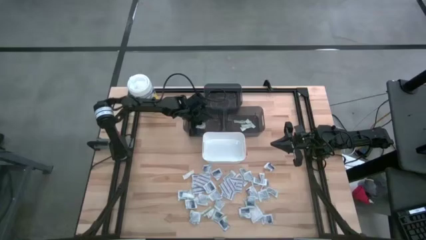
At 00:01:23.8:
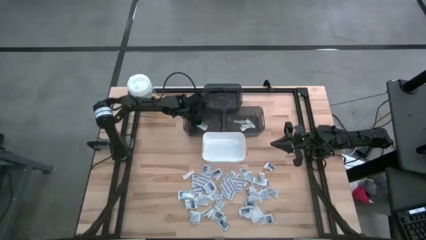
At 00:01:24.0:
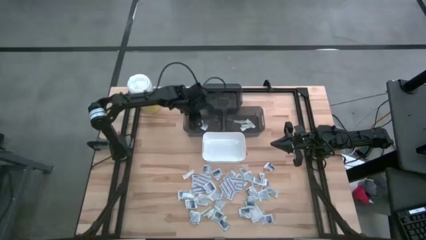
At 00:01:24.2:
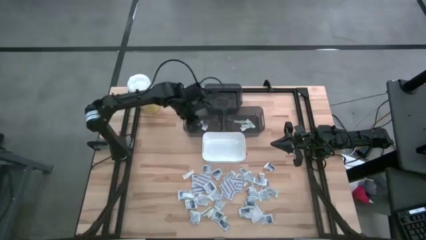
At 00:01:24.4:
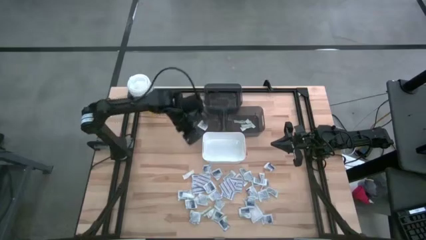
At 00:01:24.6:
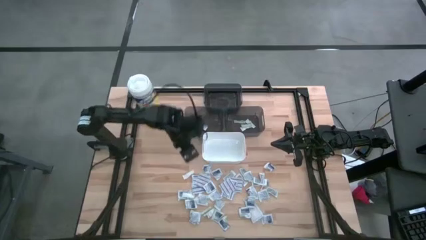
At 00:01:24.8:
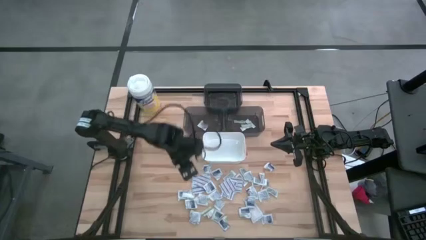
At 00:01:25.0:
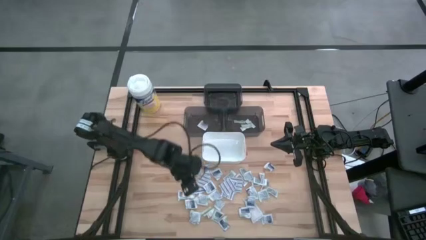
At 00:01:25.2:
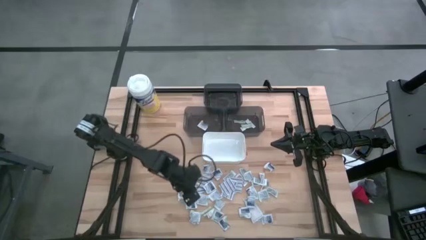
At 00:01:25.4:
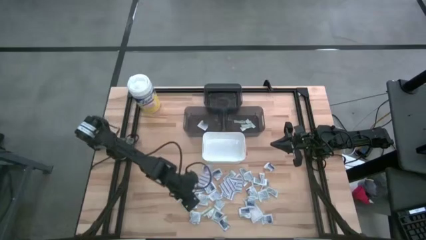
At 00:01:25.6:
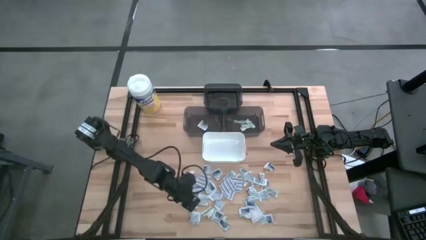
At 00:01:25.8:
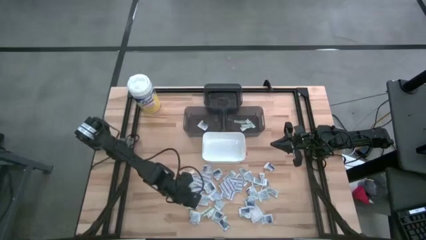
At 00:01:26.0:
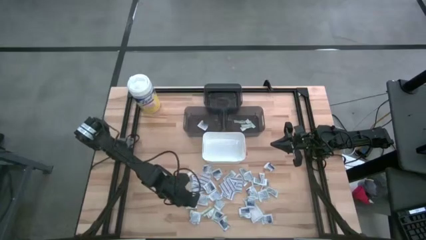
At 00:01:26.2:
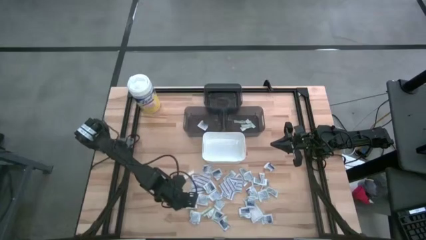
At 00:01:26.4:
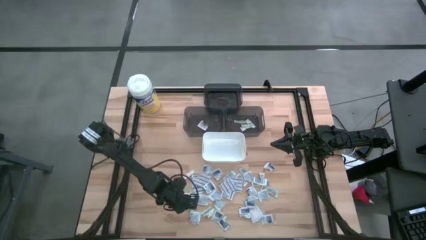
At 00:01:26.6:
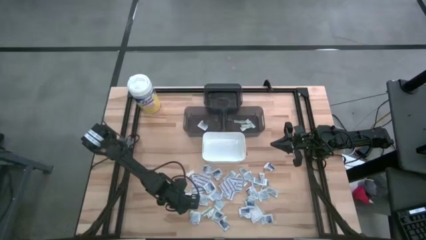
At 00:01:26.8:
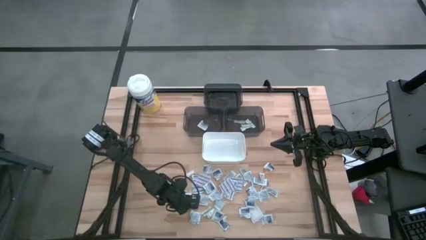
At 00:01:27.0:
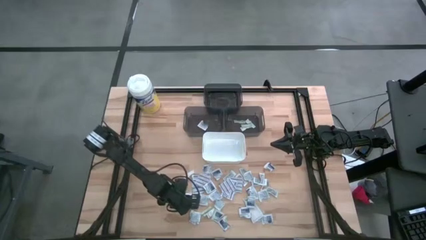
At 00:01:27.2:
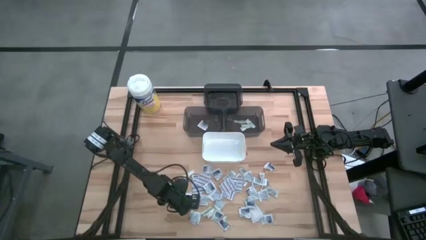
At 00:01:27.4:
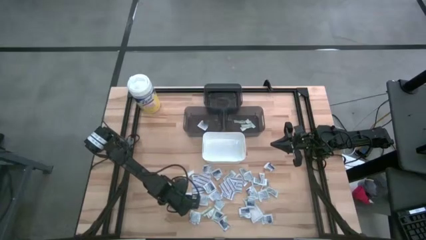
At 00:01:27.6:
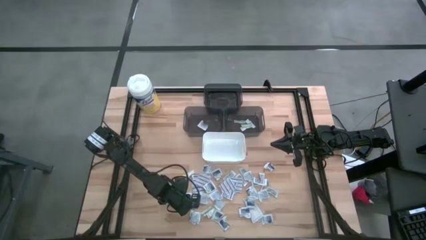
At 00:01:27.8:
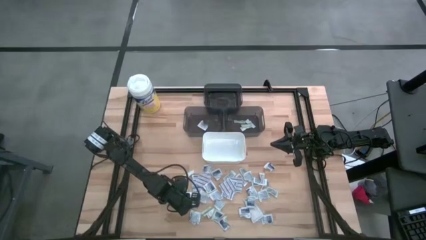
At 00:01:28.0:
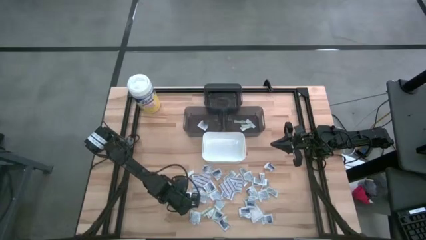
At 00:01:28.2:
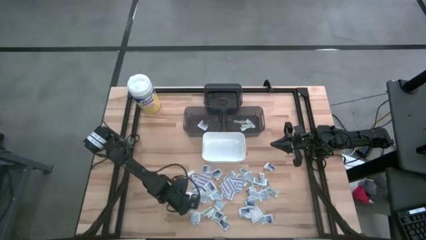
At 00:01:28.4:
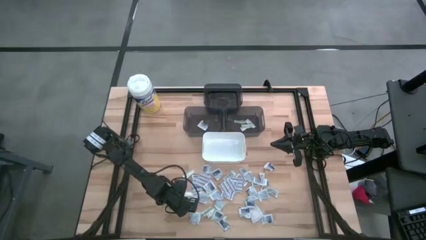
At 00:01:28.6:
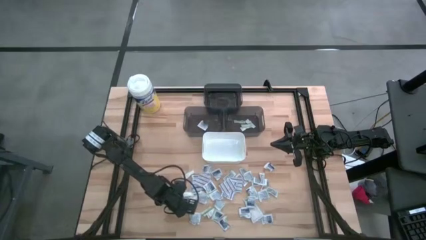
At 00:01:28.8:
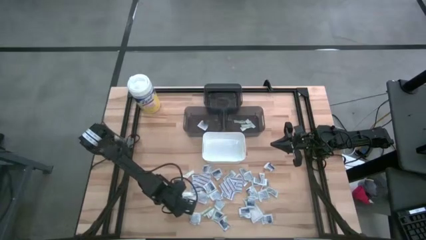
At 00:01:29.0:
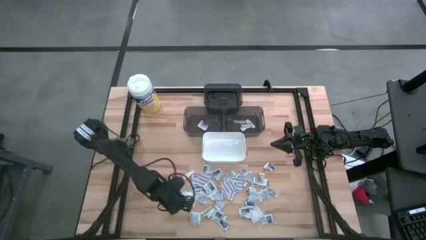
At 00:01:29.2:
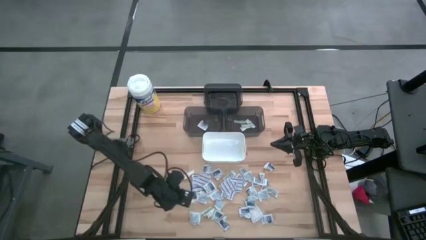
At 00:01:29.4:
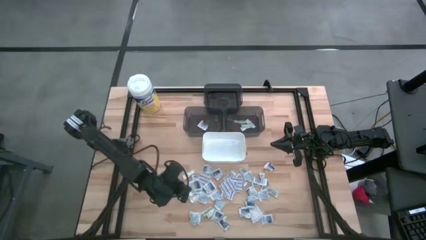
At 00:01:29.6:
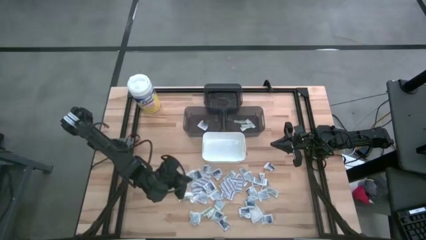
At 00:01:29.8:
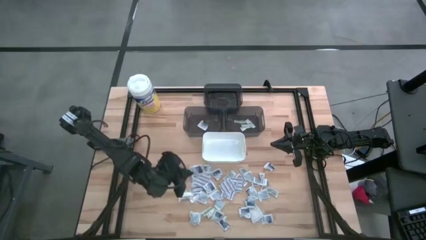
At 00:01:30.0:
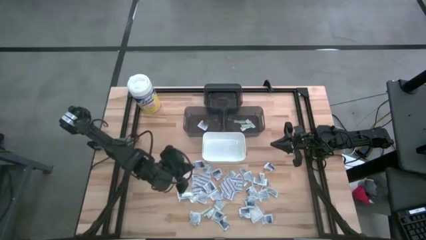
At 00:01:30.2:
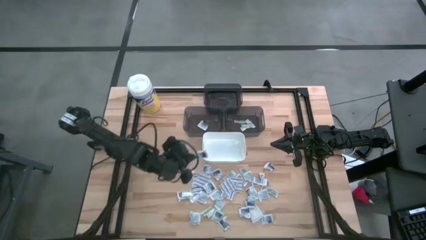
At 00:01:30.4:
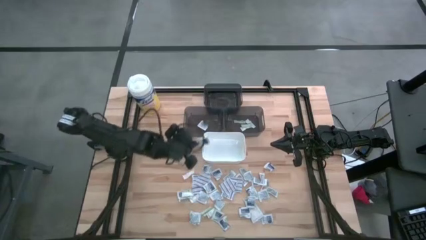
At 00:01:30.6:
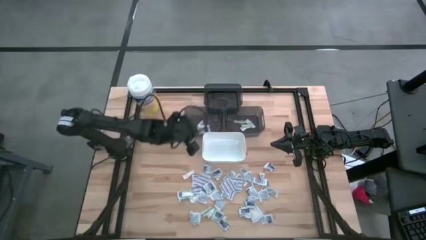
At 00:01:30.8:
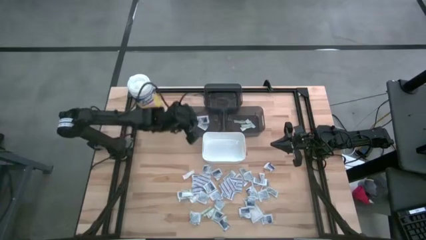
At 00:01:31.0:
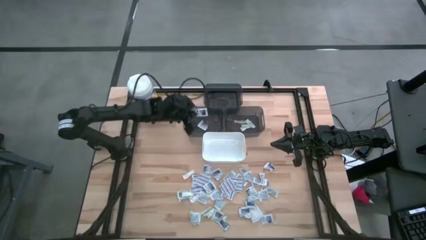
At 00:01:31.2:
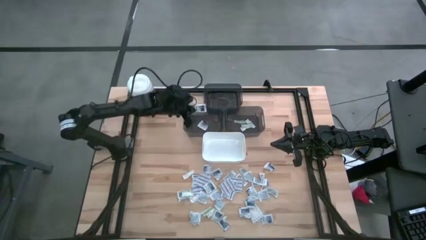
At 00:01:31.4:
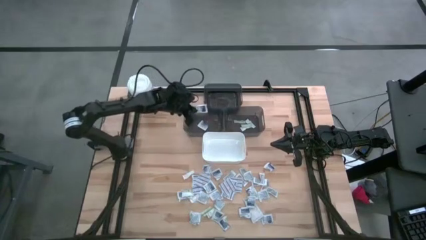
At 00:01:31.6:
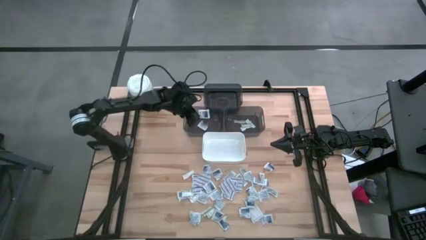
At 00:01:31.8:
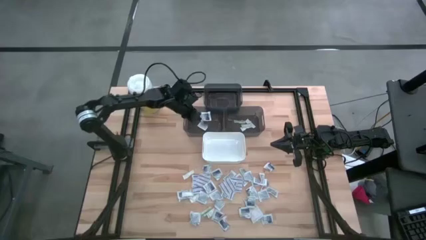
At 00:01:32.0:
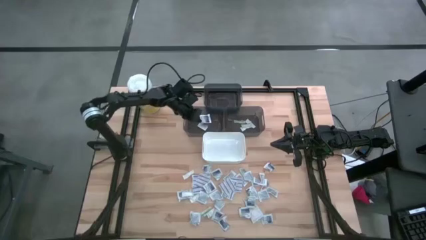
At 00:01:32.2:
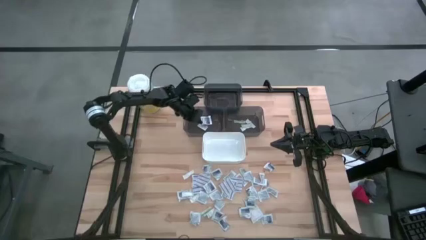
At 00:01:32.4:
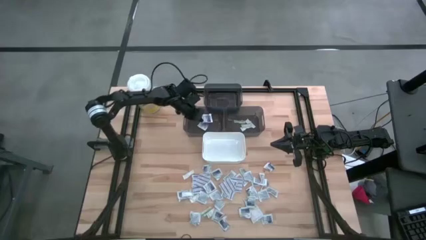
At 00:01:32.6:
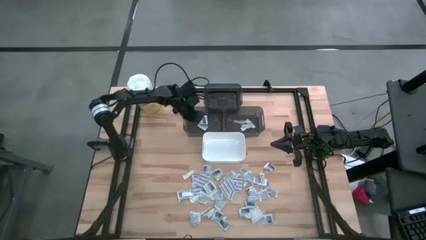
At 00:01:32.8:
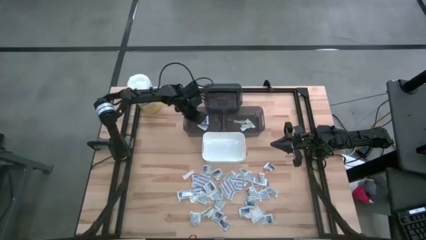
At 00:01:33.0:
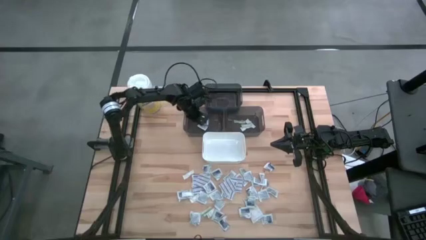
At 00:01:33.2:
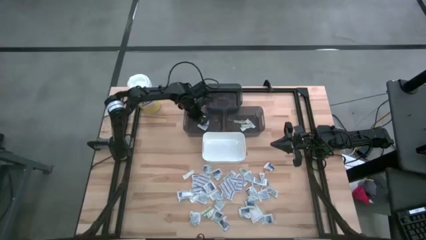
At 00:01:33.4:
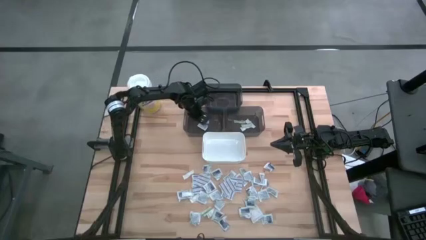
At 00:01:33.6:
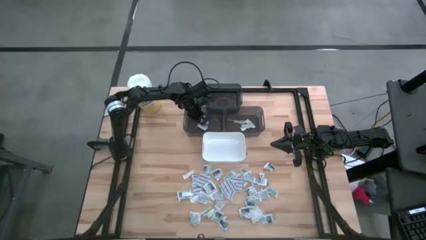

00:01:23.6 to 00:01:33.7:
Task: Pick & Place First Aid Supplies
Put the alcohol pad into the bottom left black bin

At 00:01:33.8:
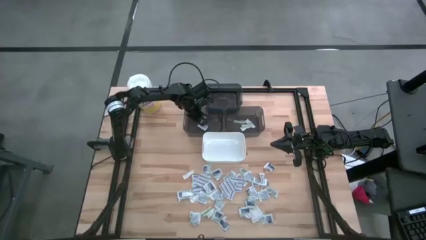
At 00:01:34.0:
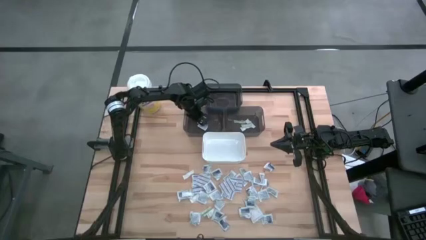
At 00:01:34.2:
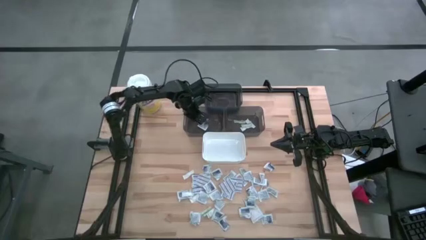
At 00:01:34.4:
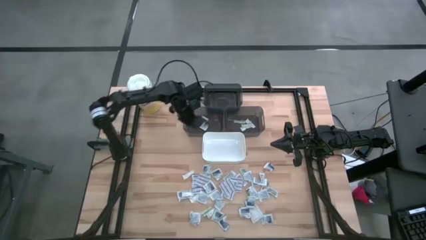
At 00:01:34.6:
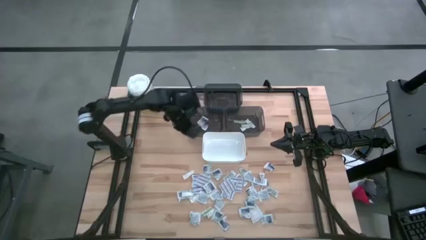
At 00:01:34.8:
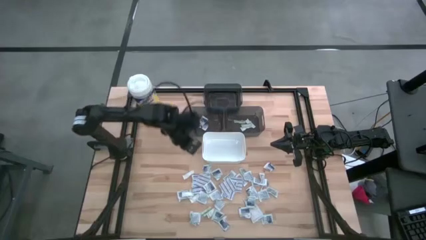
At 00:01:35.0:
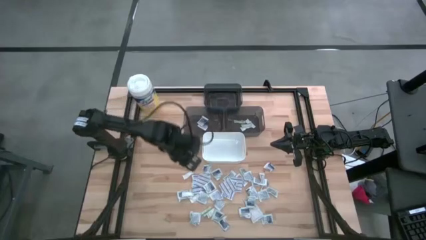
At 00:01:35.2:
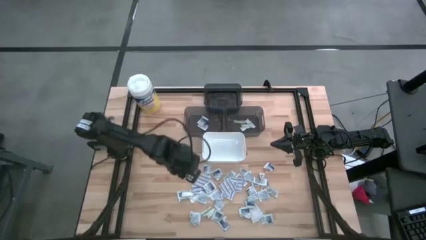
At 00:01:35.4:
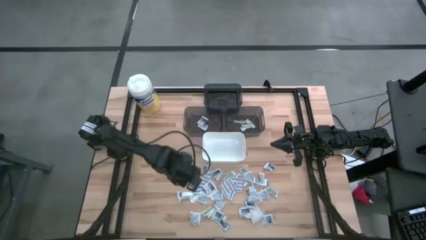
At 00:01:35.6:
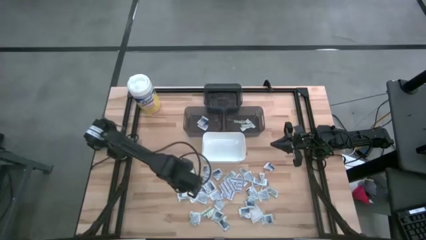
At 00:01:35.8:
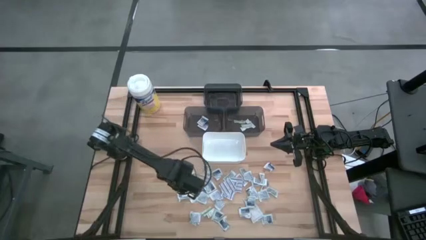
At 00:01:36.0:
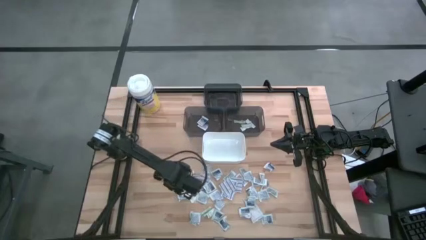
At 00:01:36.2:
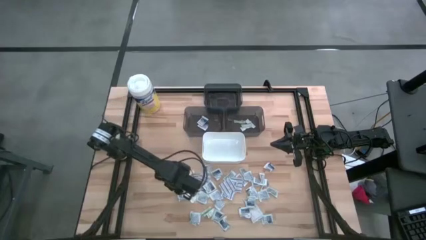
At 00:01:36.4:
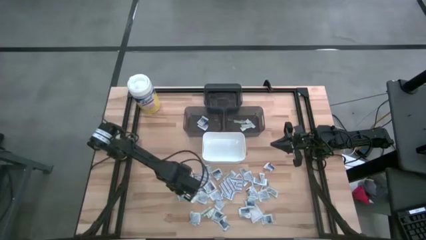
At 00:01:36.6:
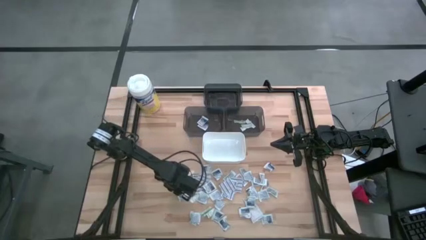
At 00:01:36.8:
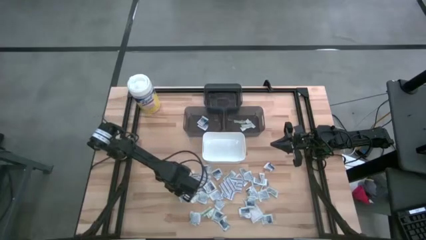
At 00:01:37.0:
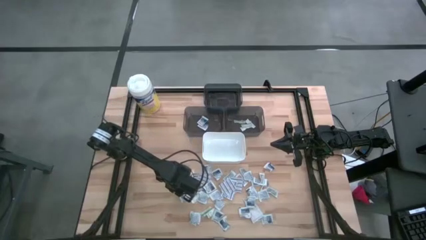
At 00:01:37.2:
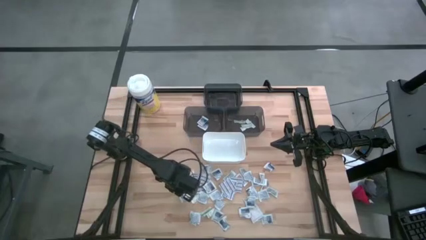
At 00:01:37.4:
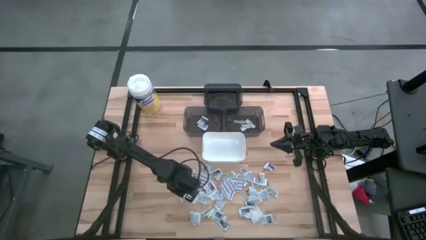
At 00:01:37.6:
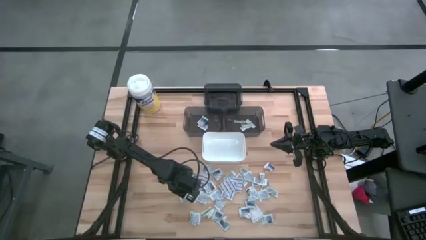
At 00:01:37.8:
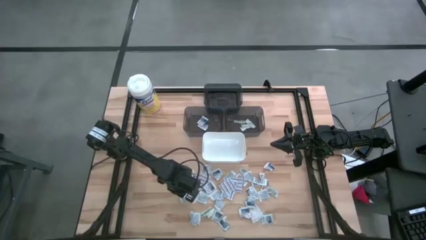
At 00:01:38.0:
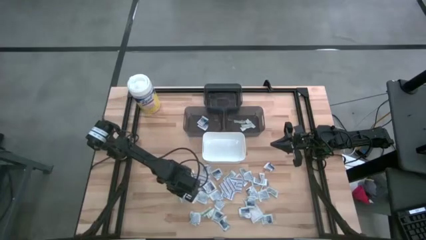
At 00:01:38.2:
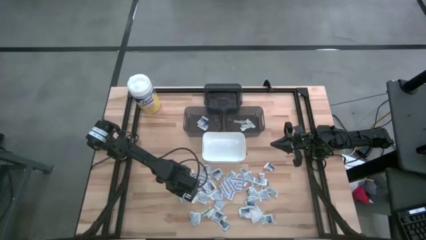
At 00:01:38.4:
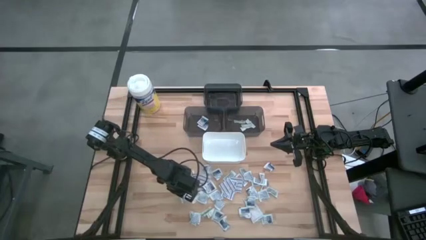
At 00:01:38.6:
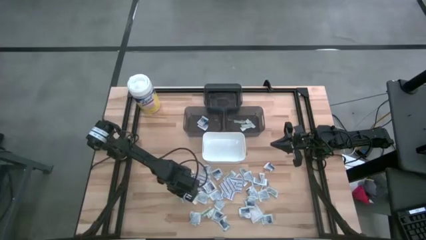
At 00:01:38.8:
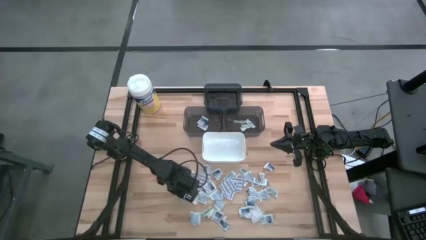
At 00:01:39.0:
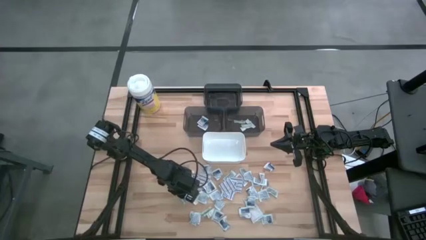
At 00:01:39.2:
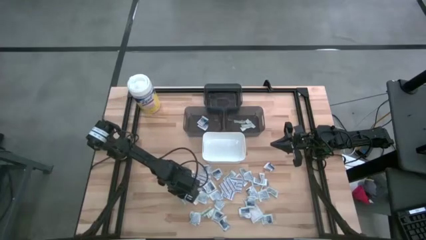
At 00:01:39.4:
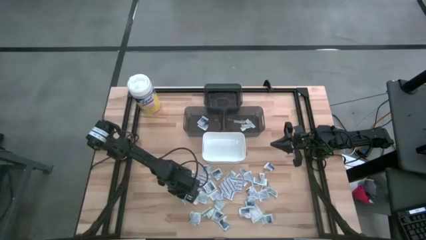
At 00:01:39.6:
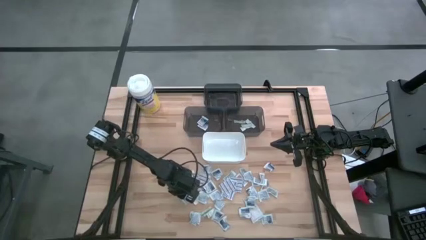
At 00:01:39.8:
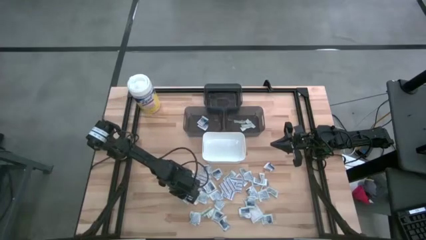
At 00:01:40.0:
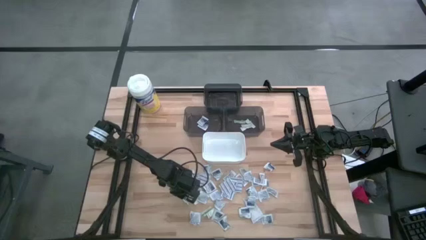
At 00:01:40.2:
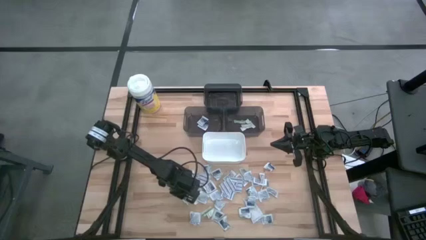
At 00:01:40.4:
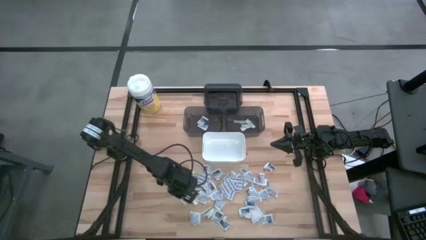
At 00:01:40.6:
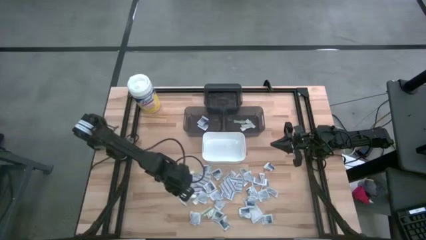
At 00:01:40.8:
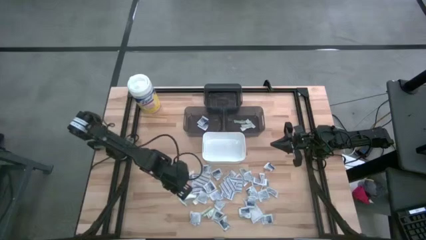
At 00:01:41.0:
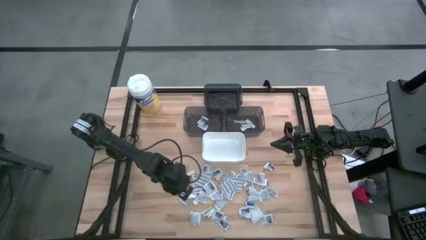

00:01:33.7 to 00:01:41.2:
Put the alcohol pad into the bottom left black bin
